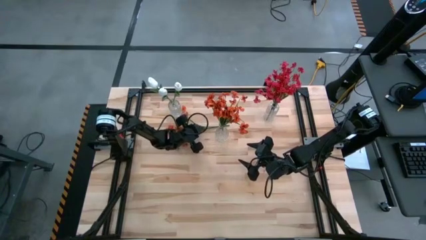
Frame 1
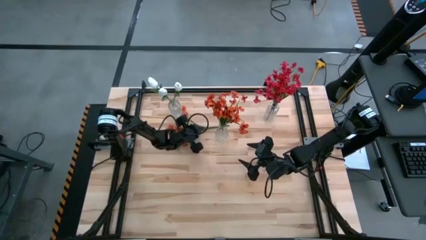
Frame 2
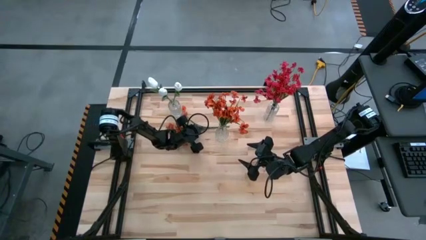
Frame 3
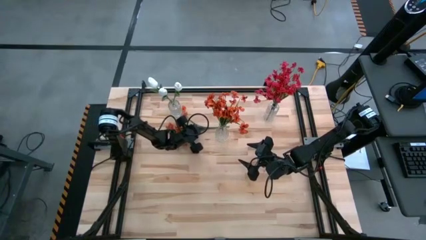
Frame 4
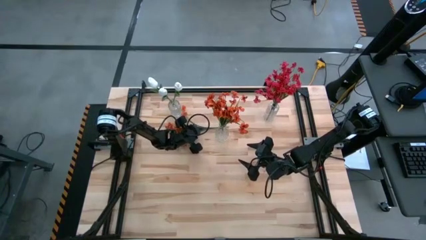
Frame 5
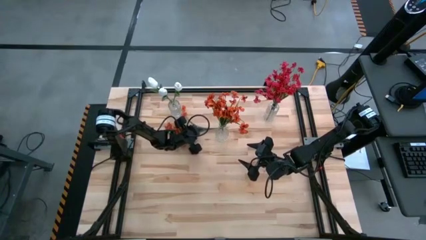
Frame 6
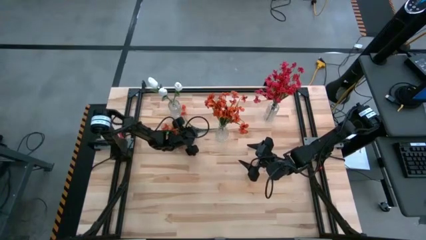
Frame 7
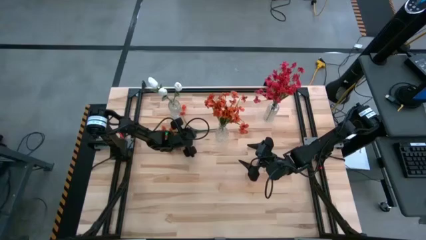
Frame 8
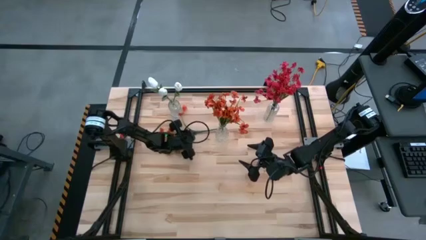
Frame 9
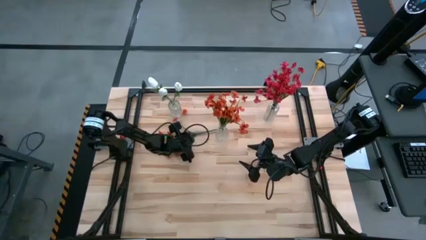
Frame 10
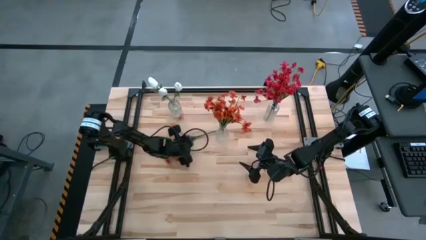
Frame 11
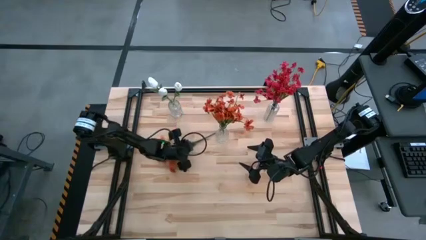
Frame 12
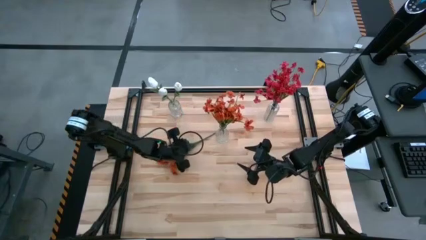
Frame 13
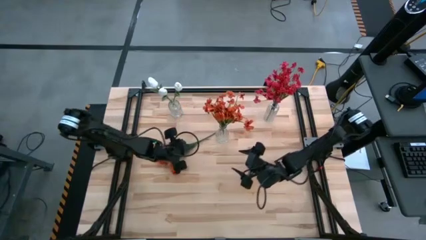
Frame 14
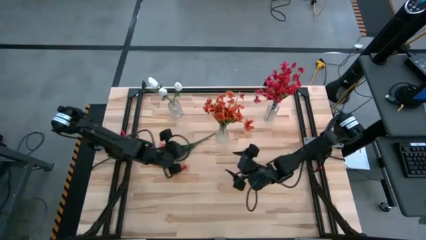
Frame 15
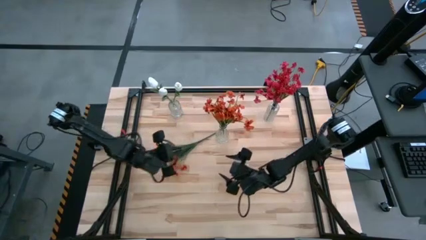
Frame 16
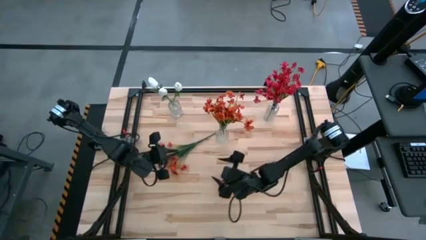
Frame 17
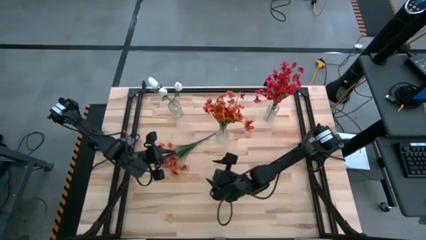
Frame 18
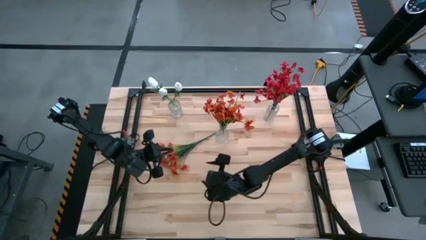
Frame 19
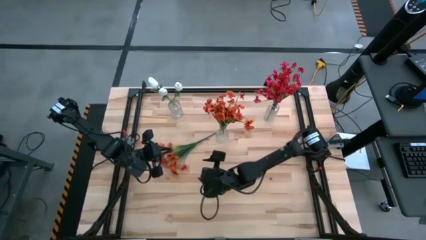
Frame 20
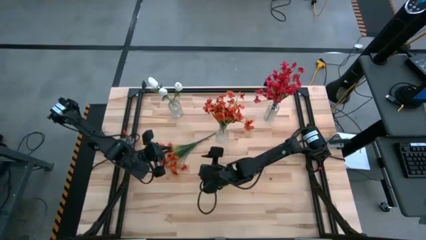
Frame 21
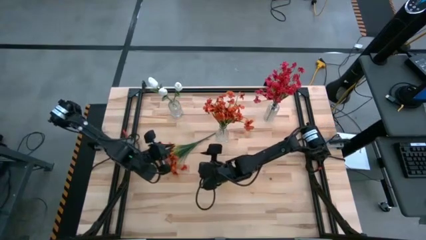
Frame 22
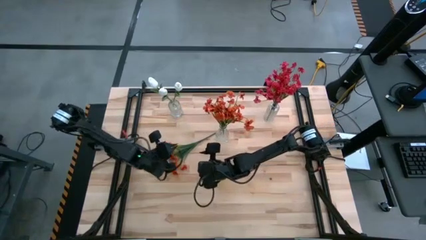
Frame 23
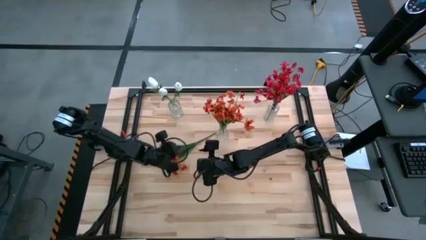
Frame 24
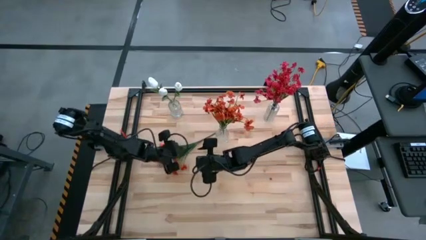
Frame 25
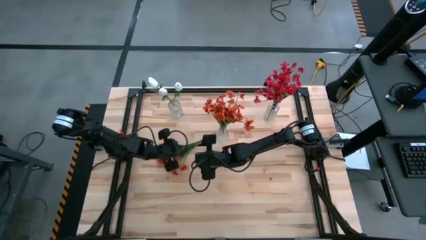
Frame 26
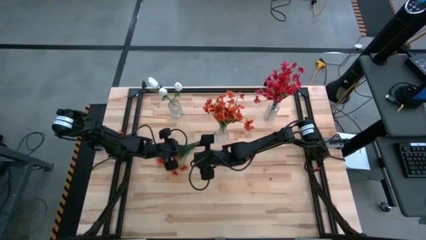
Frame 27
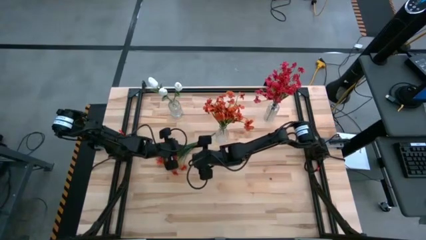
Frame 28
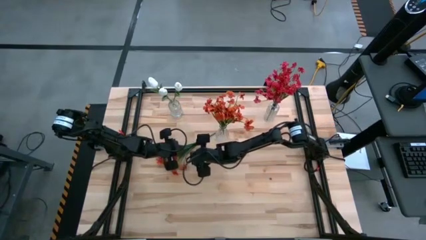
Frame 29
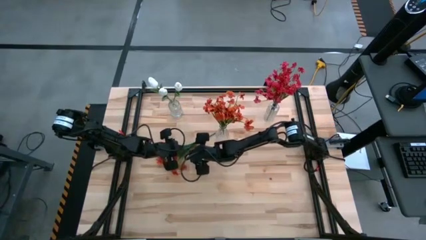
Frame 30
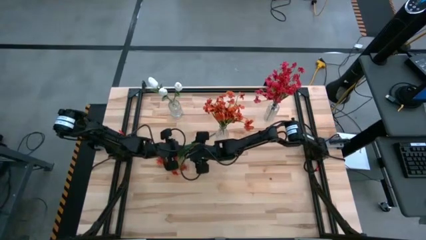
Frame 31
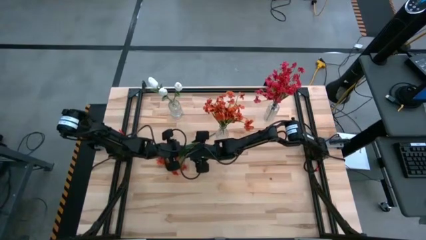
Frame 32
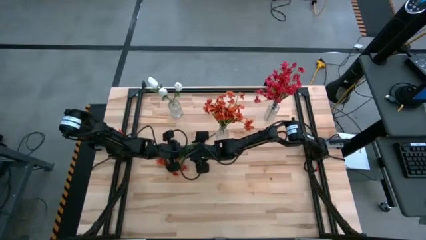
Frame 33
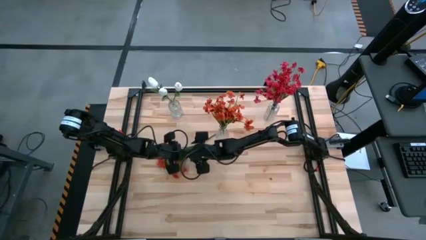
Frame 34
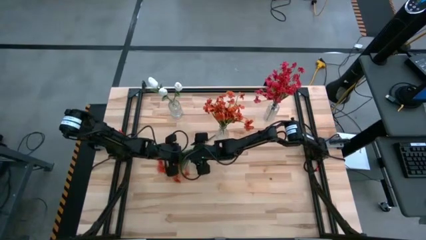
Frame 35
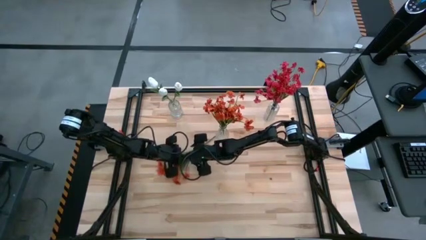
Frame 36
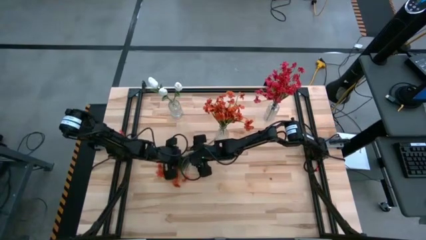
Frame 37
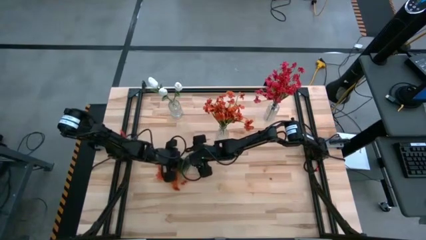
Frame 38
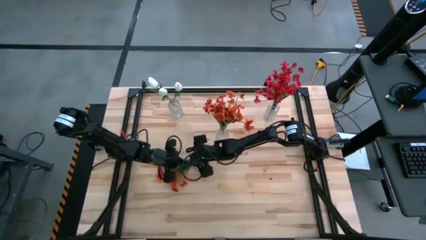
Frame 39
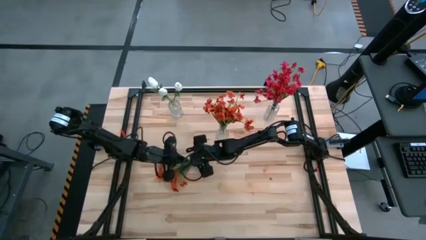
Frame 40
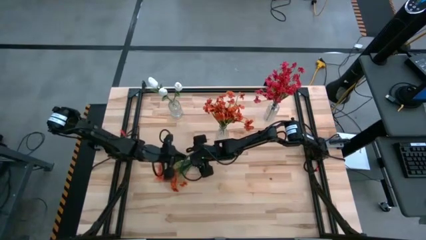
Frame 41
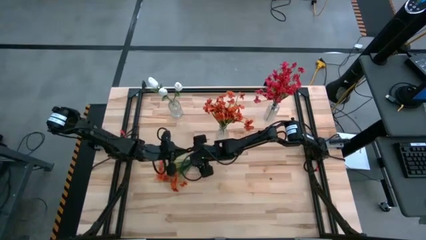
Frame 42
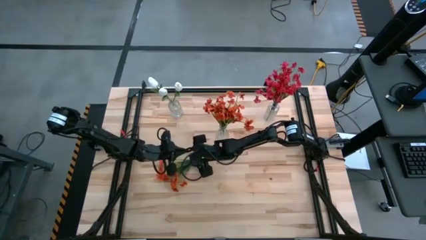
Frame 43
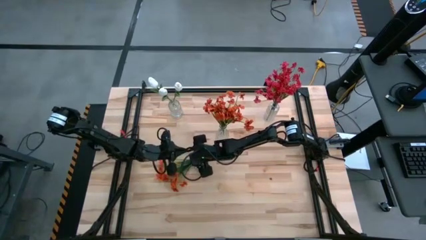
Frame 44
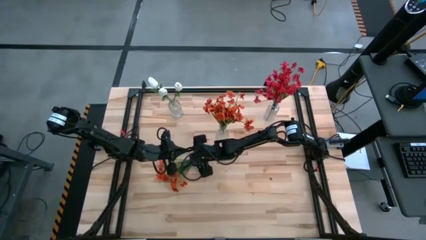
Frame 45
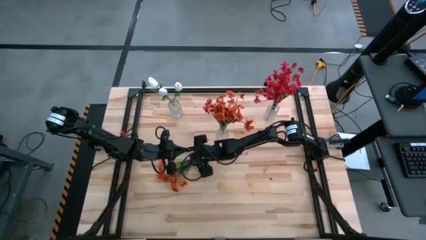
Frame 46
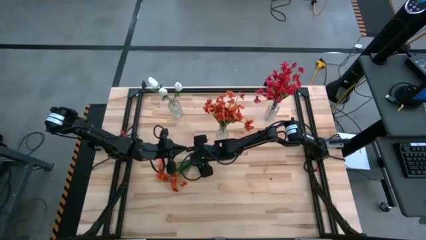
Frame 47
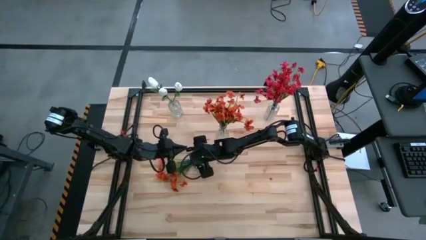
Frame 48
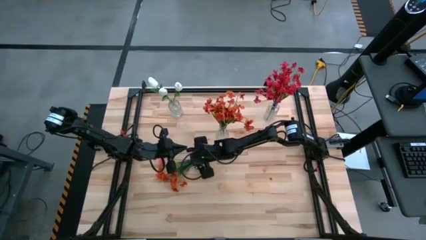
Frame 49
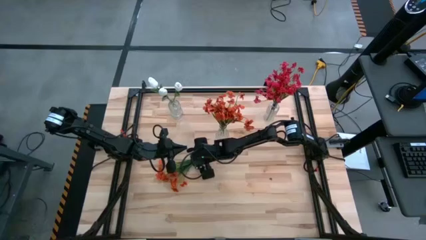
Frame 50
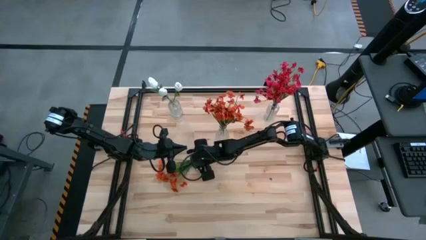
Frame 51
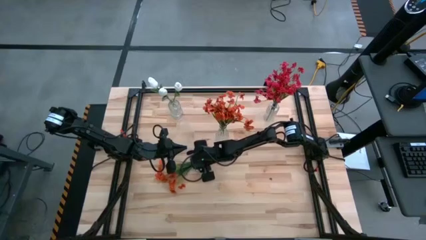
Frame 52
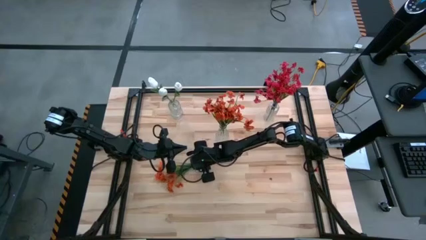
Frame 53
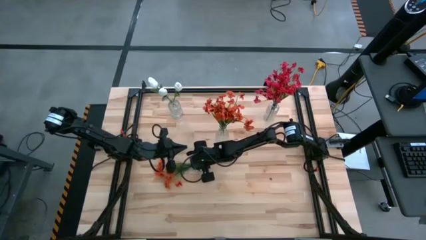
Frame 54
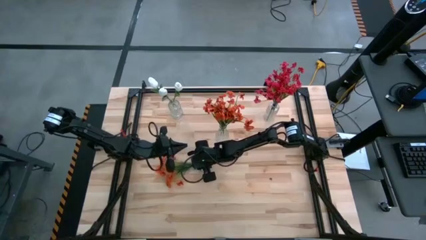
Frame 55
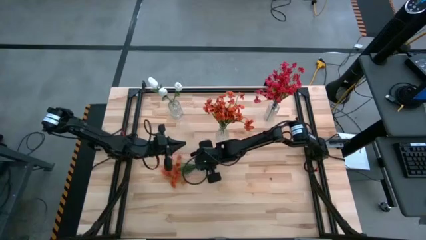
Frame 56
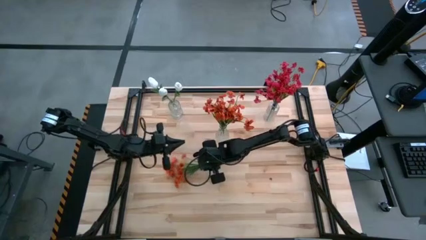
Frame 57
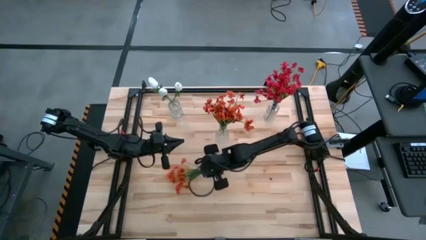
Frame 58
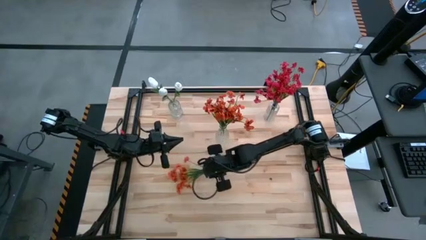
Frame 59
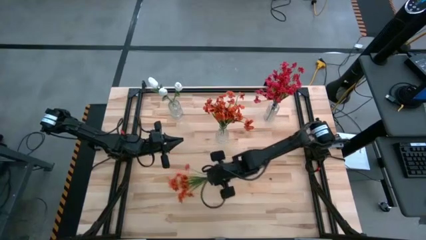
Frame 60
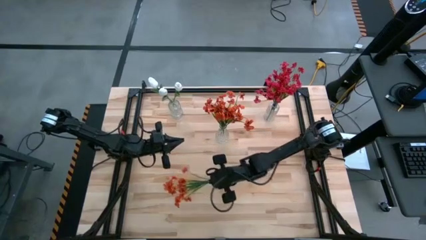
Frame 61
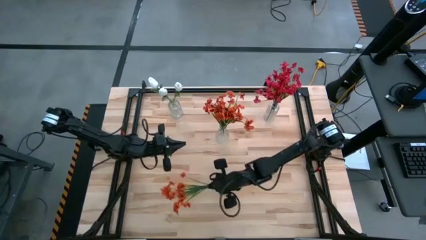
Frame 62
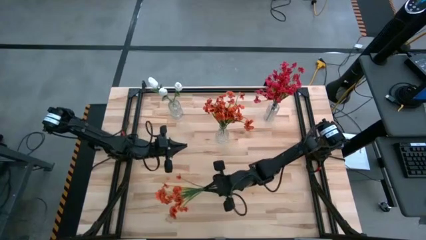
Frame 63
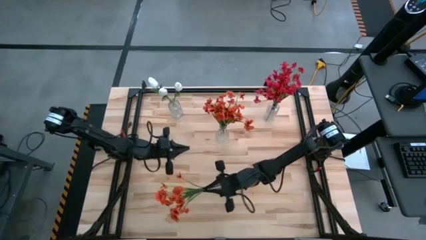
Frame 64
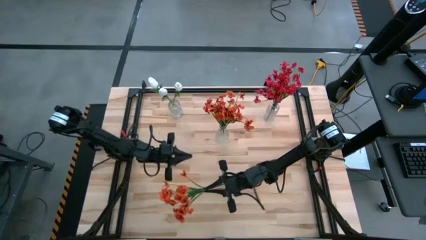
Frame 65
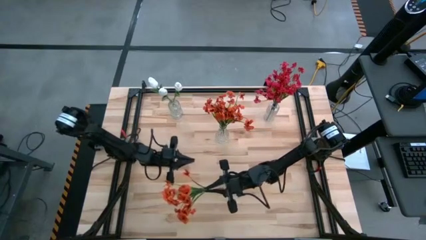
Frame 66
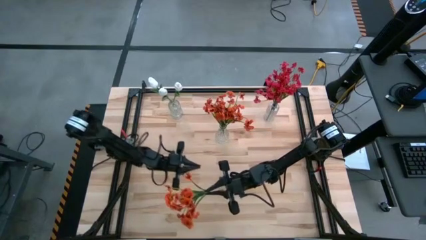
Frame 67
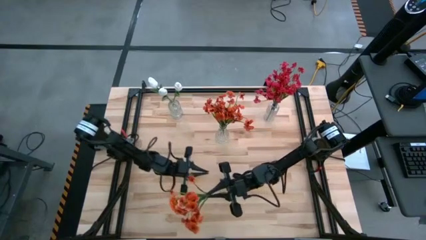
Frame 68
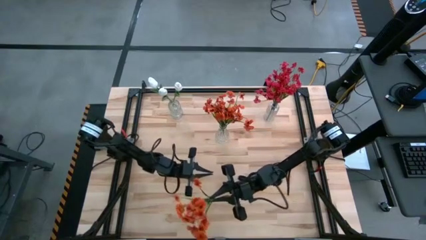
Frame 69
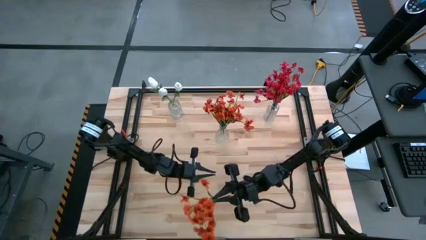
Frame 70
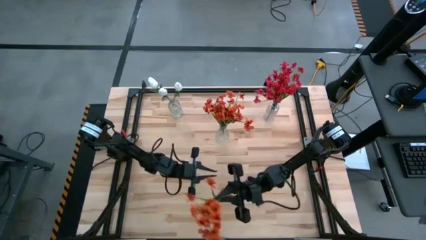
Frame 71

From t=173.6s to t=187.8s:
Task: Sort flowers into vase by color
Put the orange flowers into the bottom transparent vase

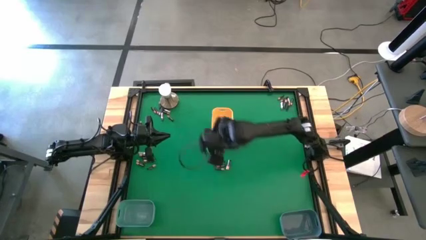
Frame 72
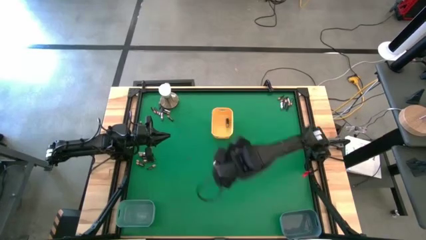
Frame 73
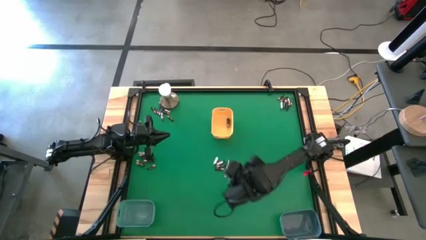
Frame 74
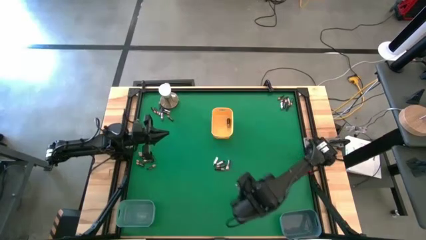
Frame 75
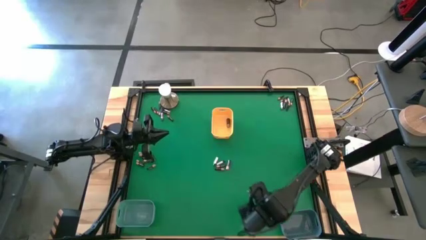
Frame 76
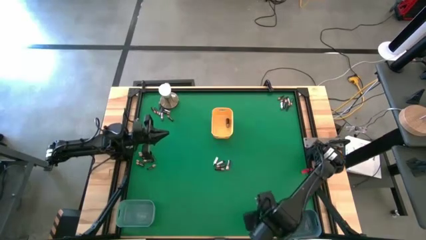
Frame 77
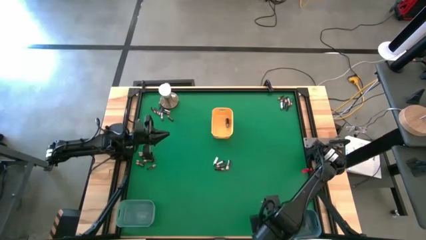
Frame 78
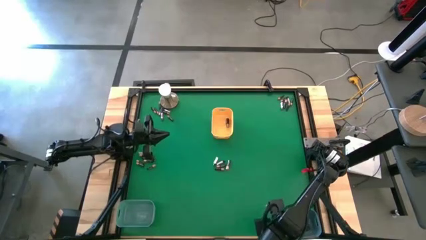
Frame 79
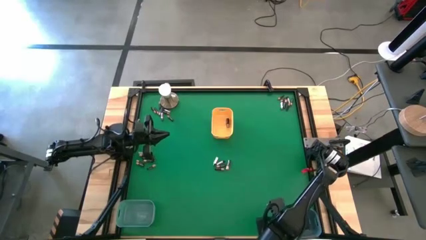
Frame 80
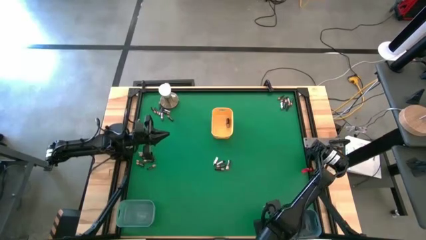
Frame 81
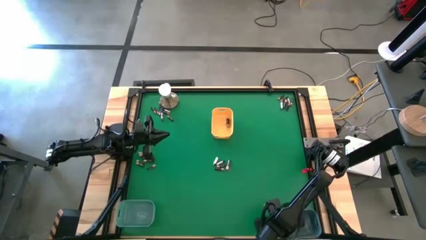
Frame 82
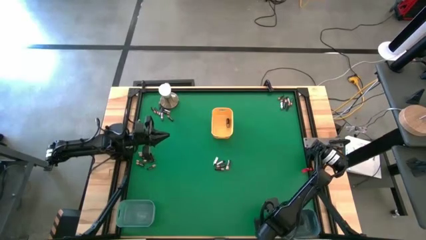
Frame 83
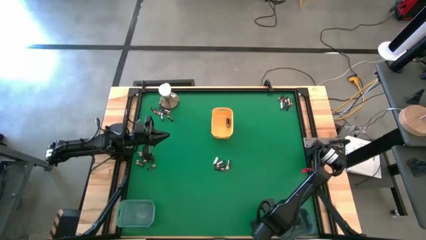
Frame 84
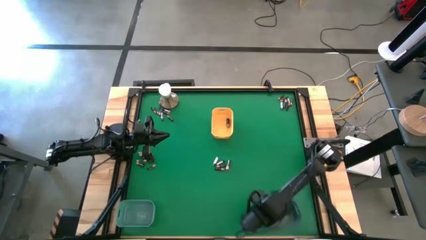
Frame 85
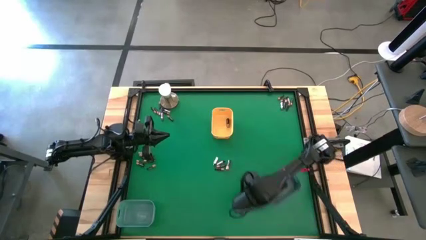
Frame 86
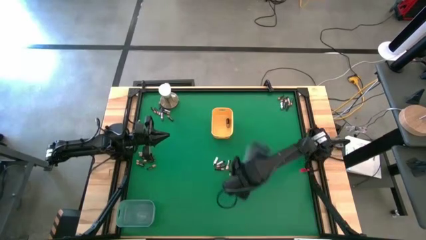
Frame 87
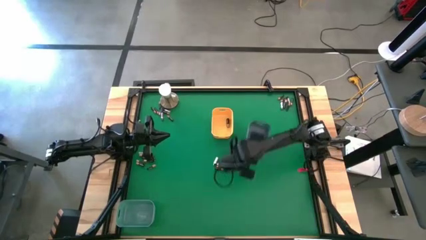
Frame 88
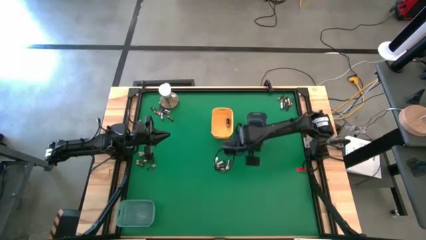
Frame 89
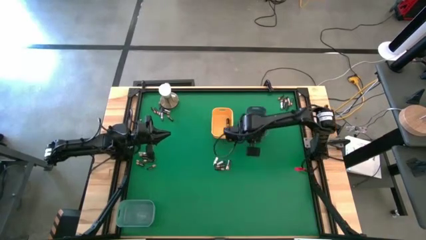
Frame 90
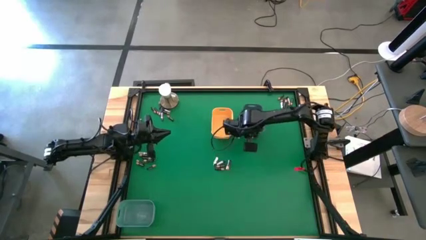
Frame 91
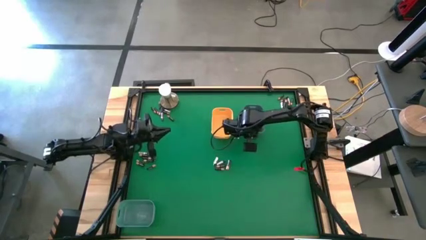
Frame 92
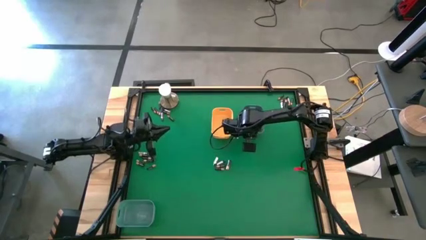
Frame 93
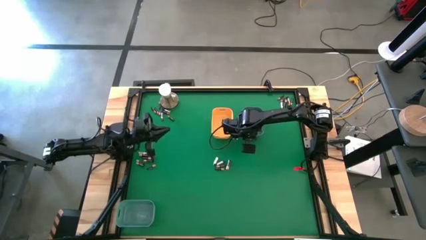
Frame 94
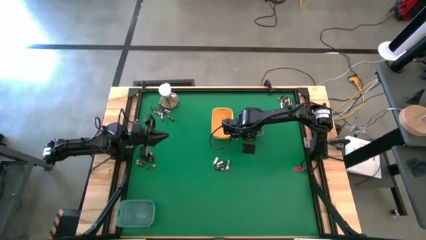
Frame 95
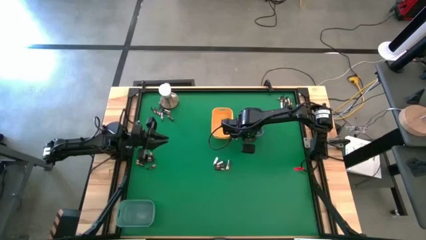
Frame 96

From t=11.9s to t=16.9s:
Task: Sort batteries
Move the blue bin to the top of the table
